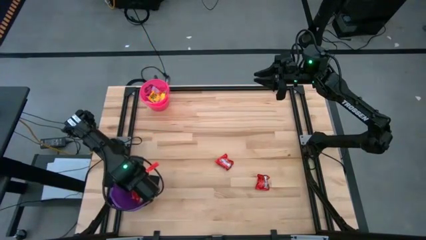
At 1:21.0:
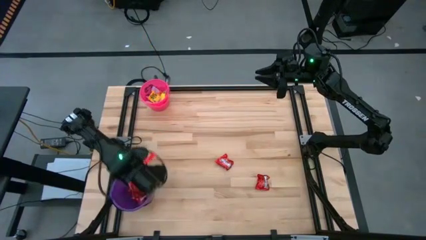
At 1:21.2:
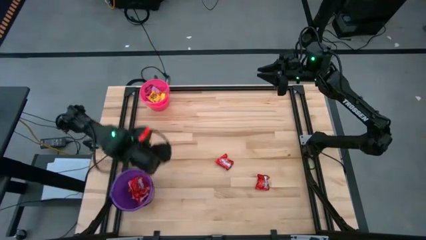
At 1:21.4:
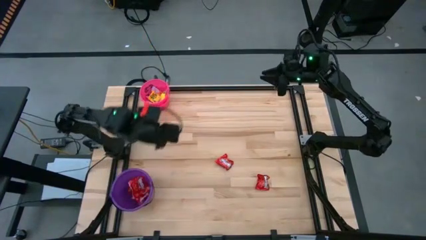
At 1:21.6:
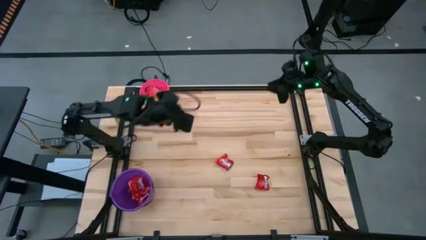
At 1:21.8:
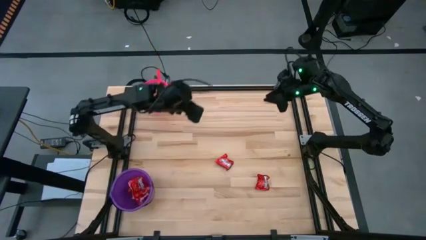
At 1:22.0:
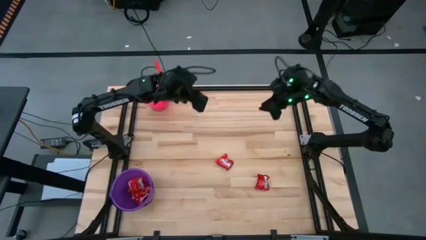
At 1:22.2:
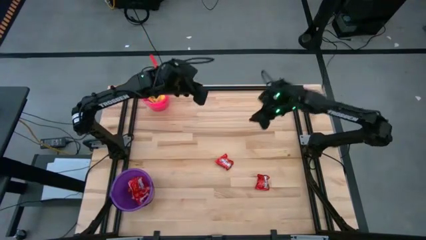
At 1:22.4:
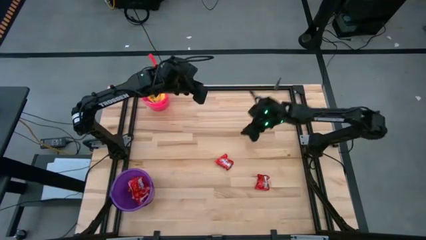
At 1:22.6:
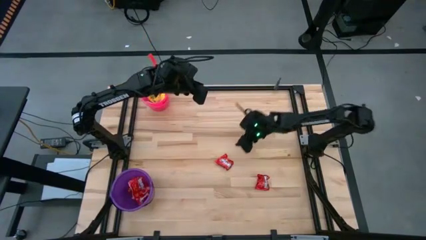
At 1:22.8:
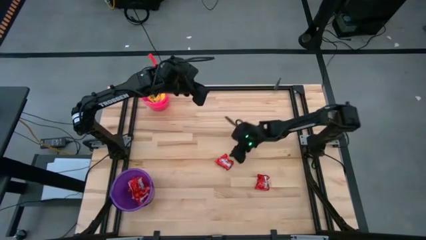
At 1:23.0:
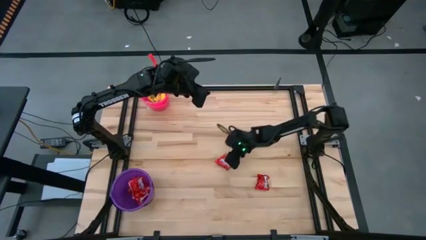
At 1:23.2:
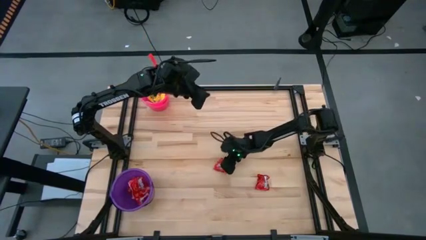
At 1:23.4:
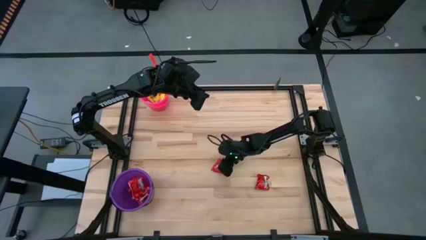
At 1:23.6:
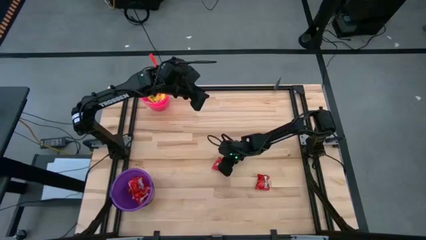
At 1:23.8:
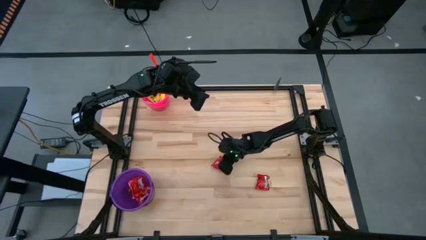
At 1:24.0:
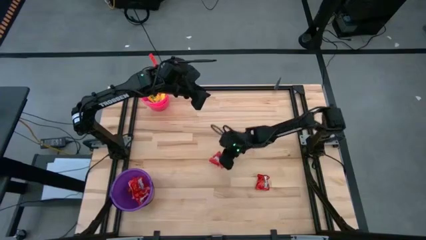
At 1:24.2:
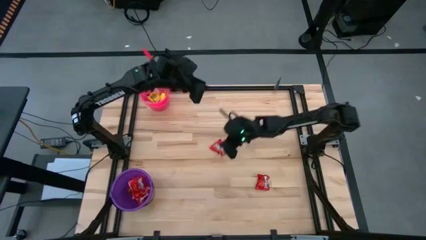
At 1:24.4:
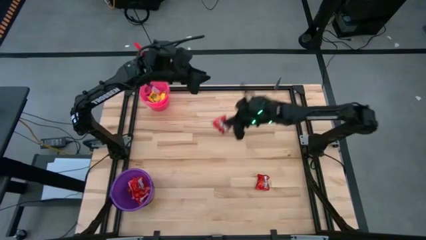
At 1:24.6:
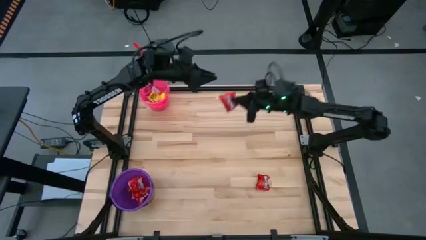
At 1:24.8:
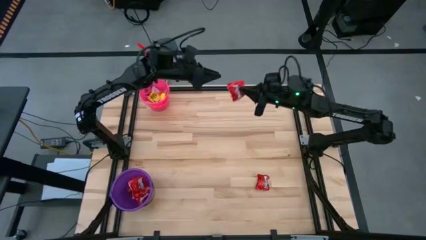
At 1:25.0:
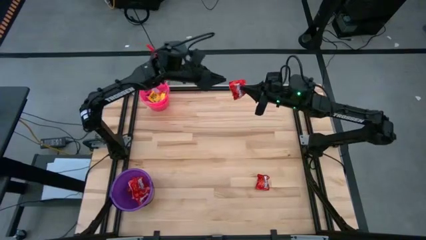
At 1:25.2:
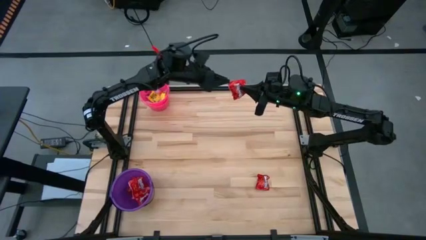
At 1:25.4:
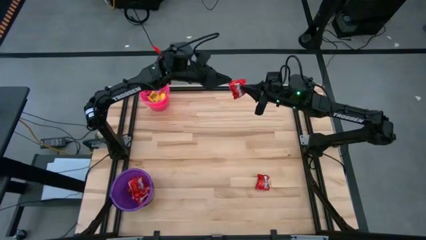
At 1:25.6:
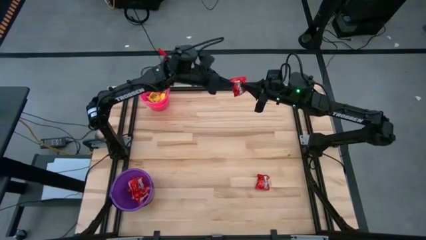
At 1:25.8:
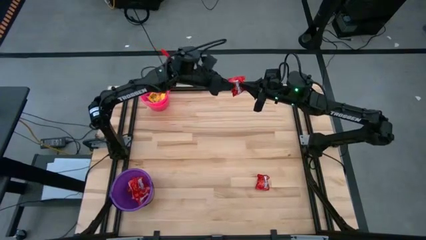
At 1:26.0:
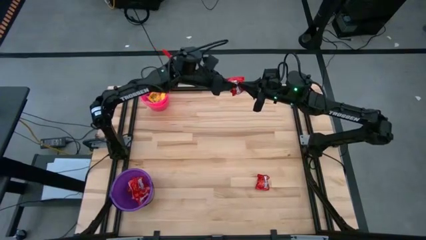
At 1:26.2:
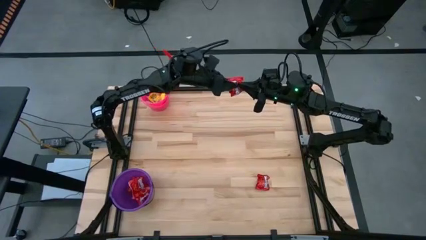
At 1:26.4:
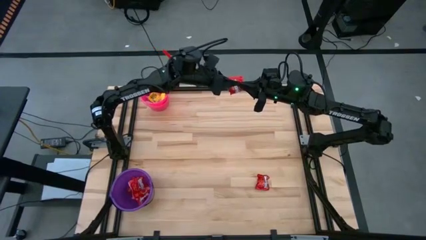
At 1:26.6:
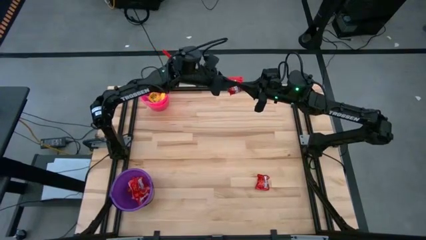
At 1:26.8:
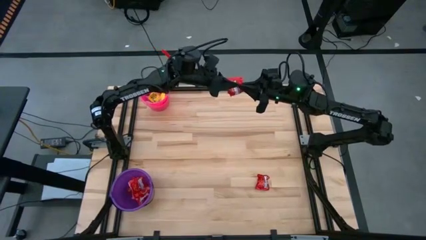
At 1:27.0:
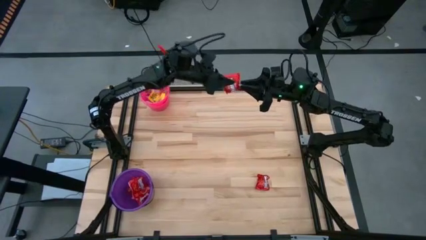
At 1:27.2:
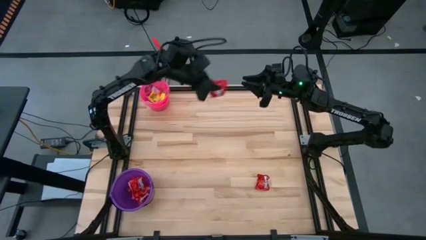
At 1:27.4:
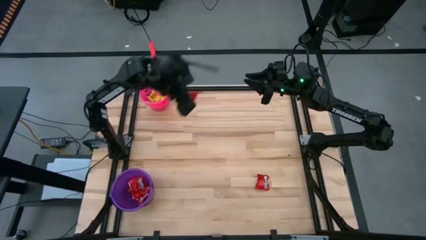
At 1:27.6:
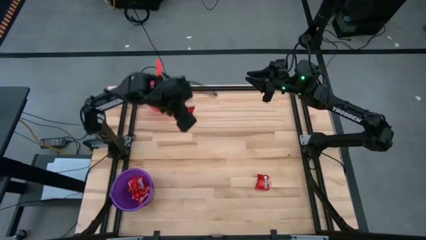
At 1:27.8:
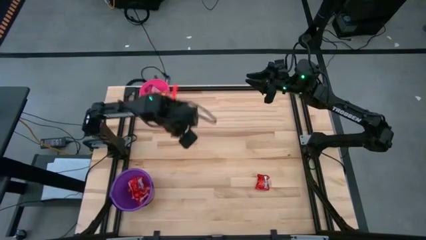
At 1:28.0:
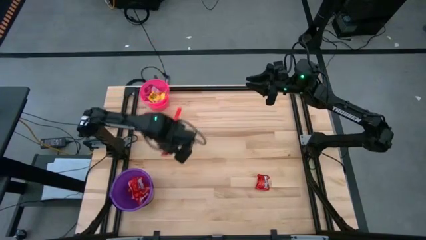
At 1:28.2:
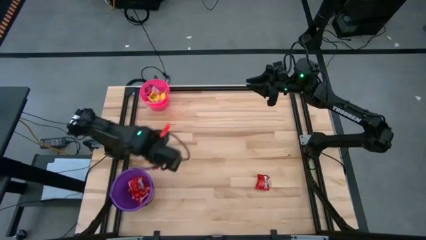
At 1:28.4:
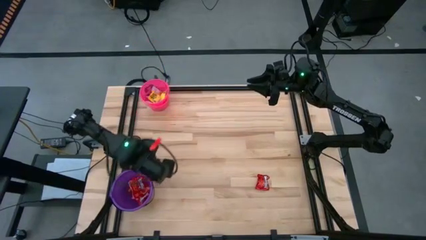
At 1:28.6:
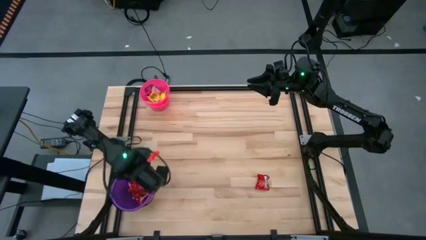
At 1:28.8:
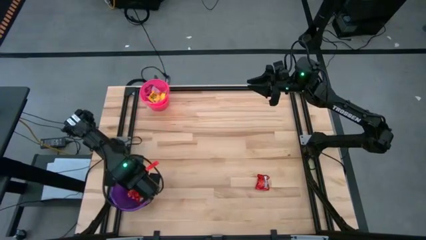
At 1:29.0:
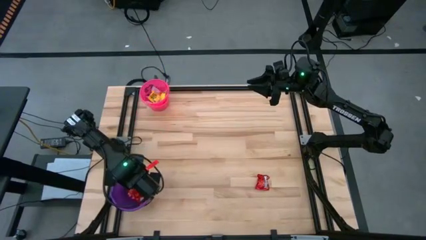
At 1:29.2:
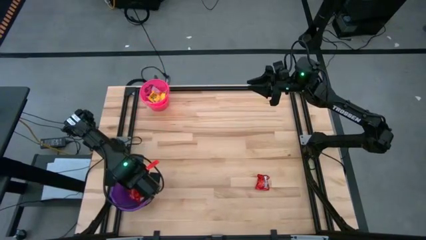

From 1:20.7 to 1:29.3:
Task: Sort candy by brand, put in halloween buckets
Put the red candy into the violet bucket

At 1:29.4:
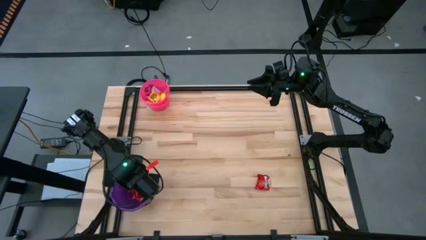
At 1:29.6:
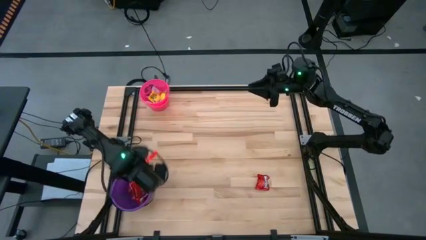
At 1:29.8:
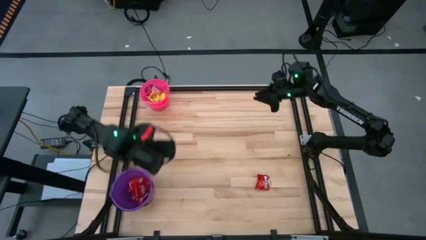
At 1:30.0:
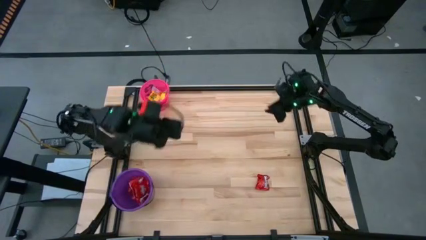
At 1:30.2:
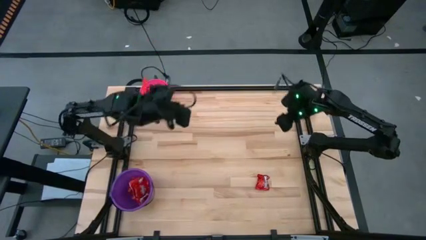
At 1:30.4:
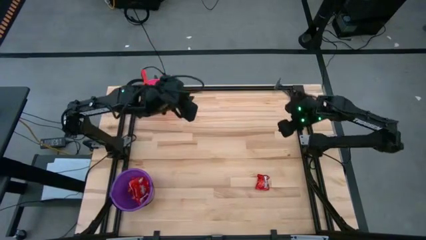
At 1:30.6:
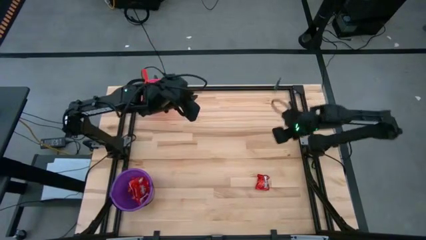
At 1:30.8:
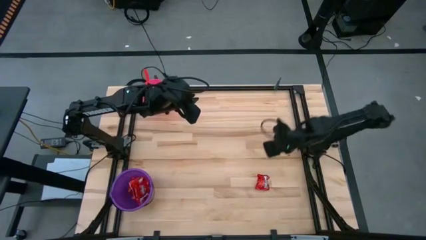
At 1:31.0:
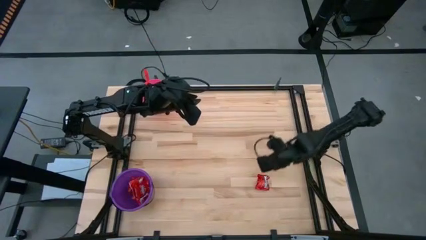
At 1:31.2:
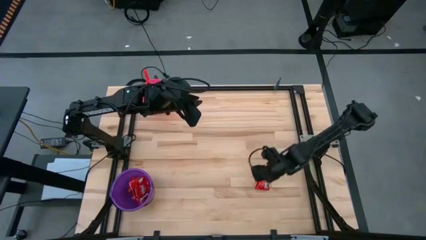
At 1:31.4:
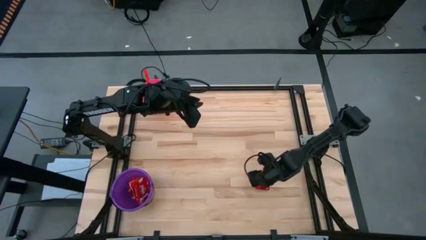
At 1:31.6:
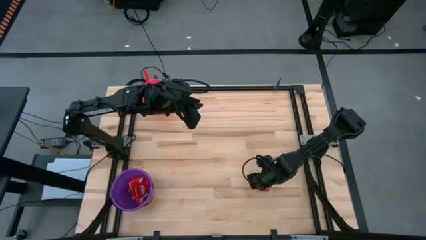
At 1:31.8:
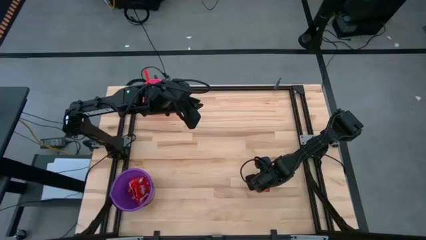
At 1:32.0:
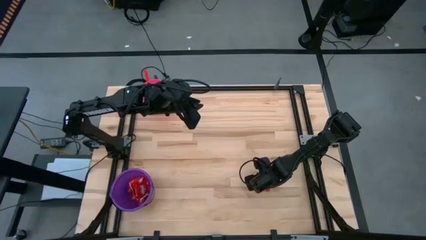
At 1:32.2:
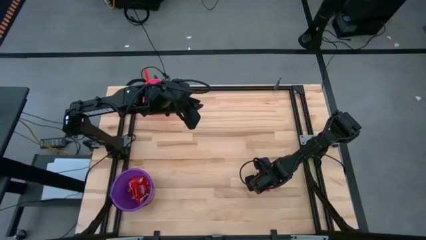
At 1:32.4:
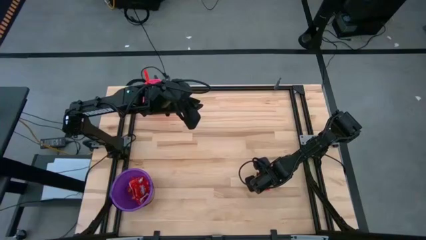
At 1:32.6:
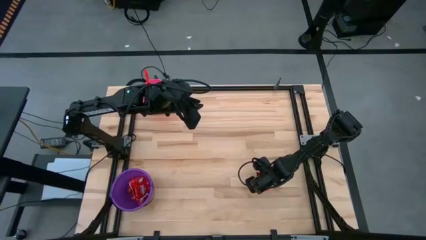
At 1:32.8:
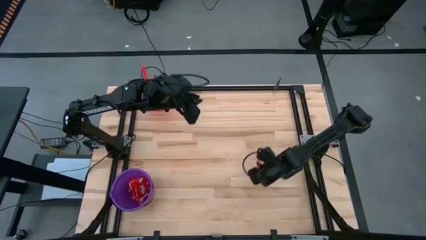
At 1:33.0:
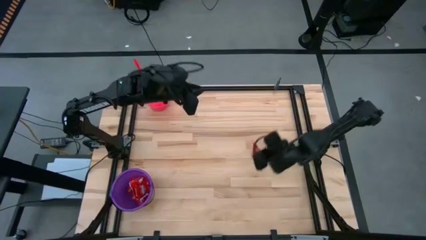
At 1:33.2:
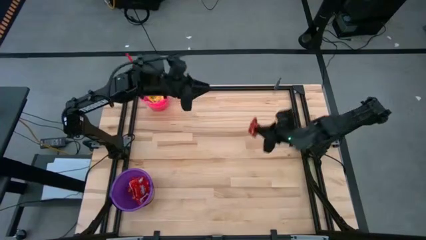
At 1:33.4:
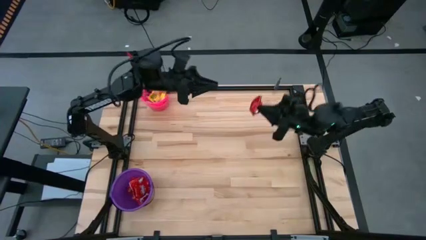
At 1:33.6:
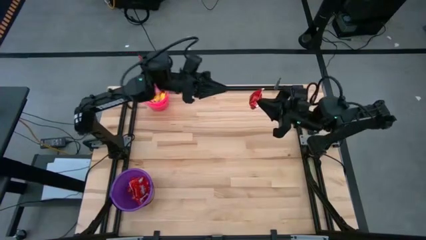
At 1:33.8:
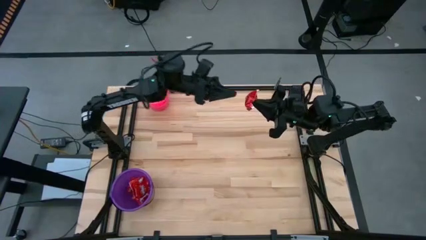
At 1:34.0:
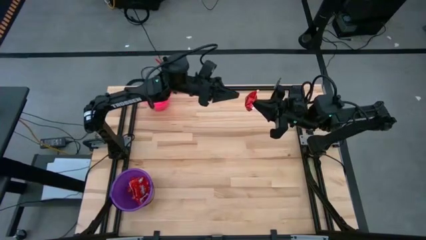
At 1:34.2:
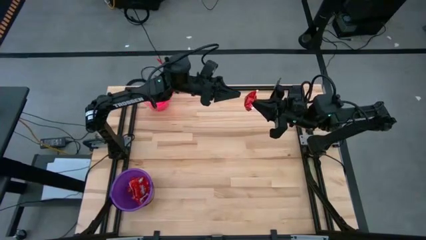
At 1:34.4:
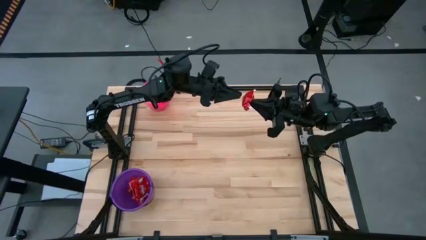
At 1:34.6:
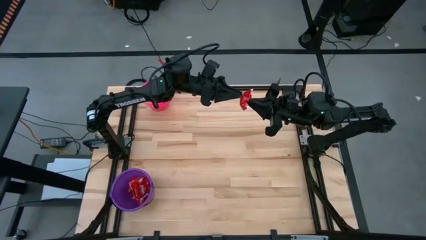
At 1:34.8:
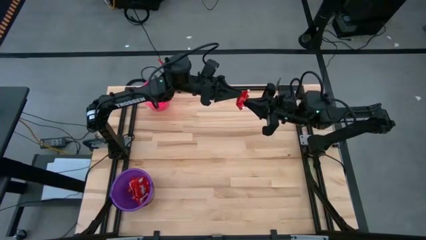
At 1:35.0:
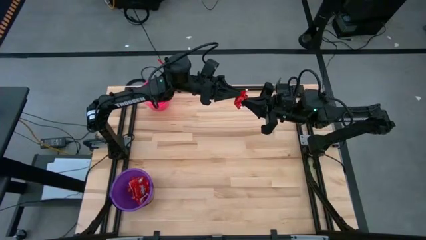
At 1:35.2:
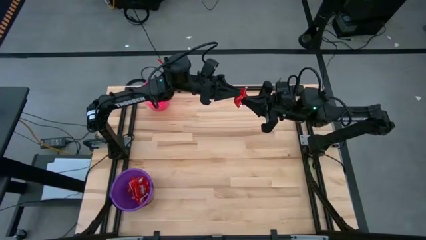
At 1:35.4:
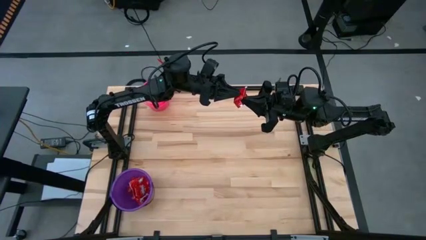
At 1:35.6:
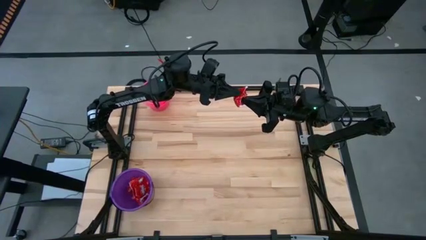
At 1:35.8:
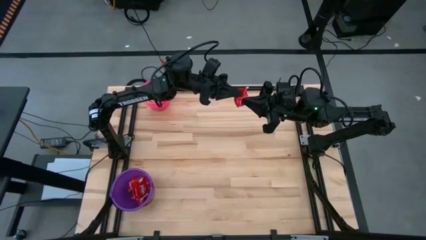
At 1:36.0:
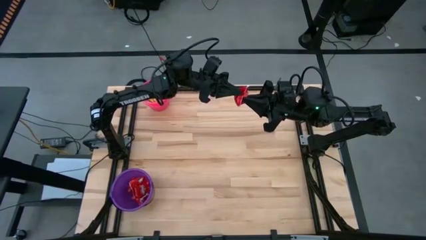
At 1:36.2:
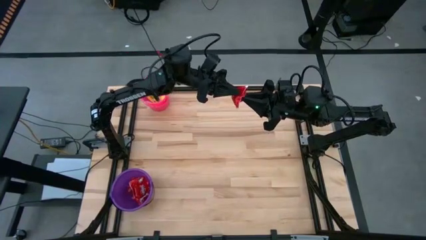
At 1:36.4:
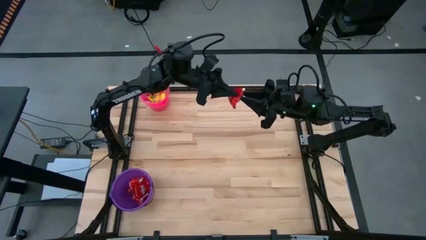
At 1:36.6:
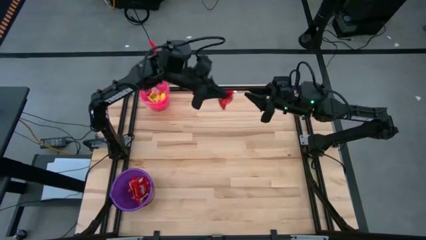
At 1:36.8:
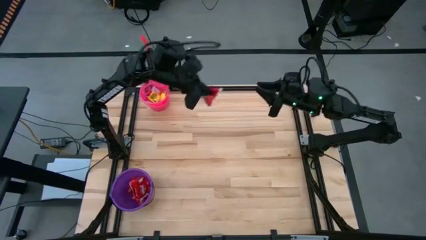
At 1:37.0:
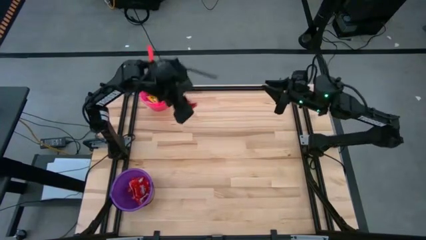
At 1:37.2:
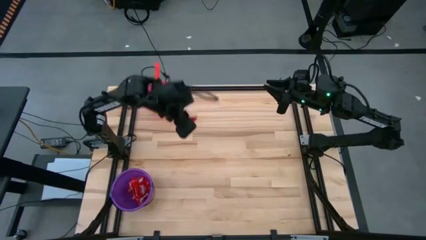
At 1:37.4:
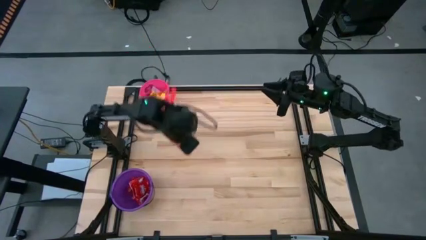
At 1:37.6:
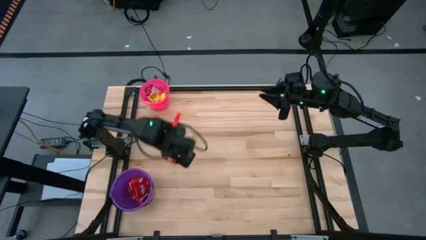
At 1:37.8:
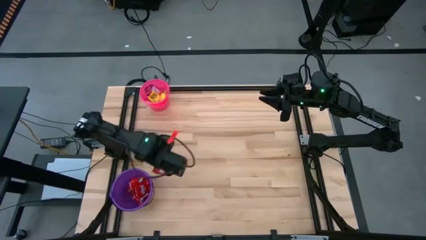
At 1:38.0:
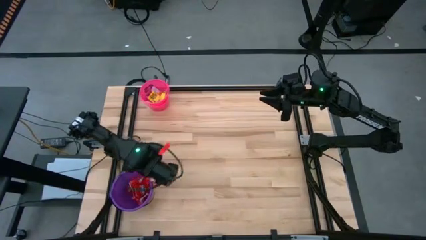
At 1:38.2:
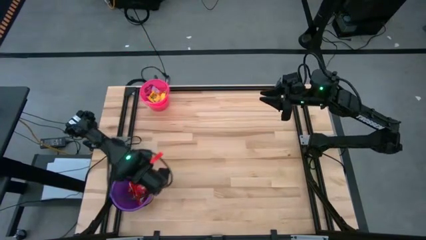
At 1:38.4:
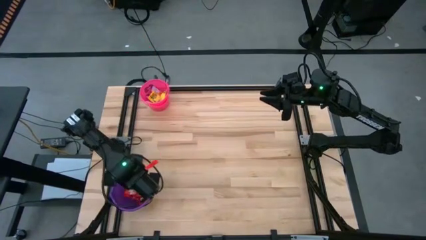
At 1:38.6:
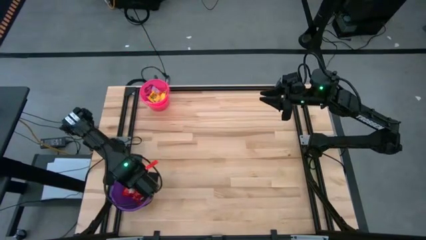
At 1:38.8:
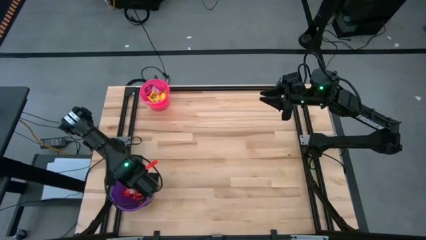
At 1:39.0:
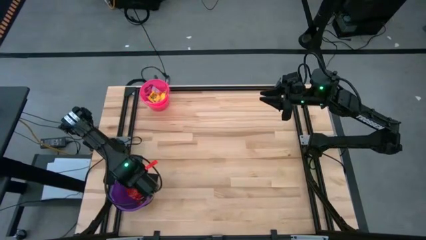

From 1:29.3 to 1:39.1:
Put the red candy into the violet bucket
